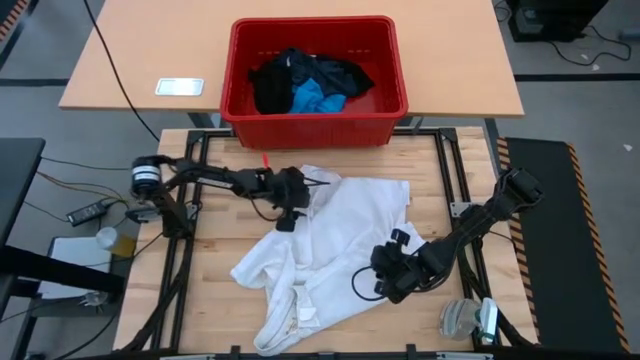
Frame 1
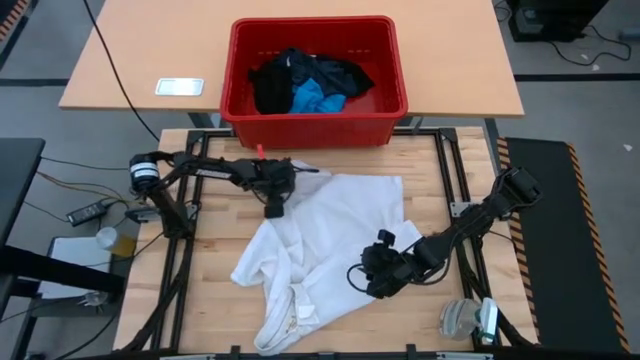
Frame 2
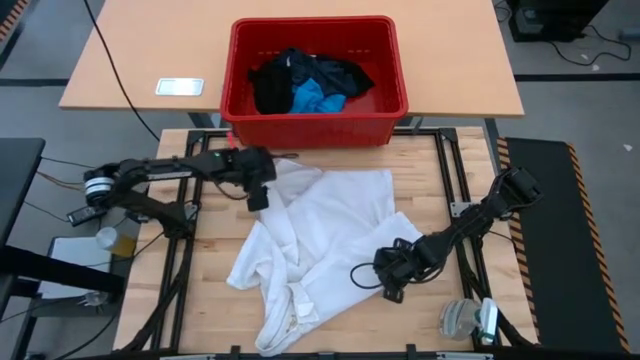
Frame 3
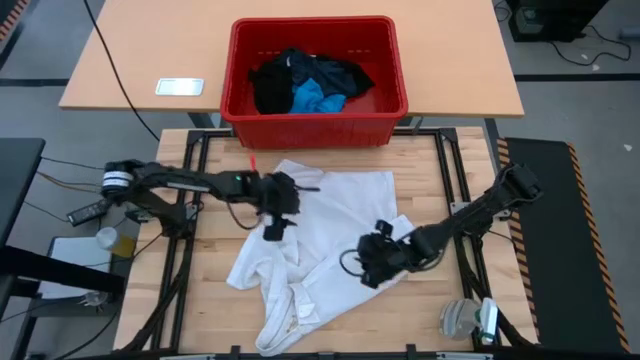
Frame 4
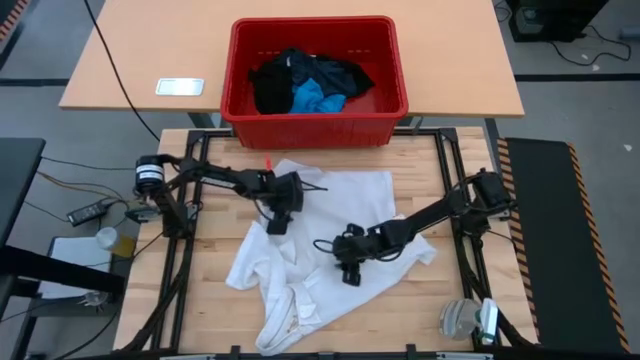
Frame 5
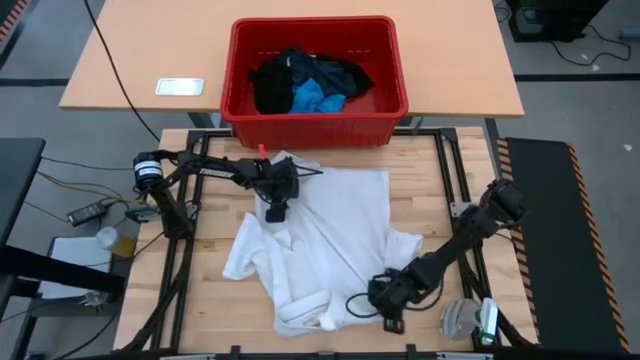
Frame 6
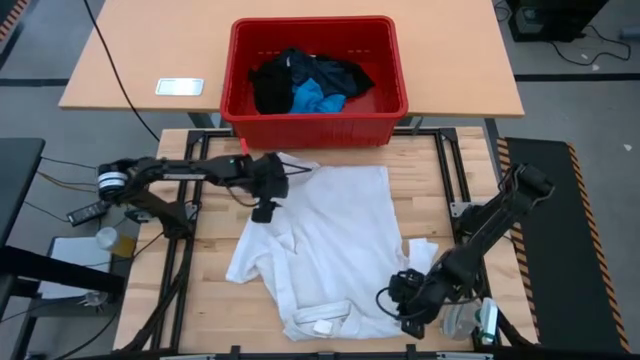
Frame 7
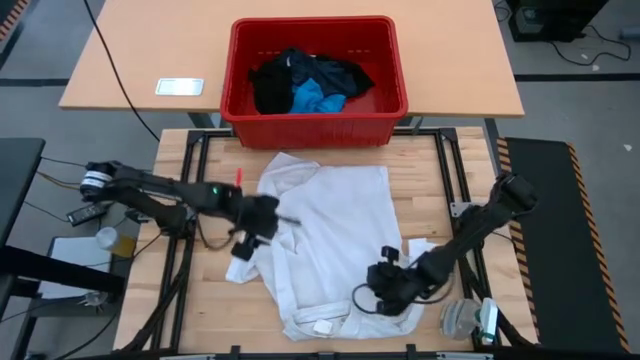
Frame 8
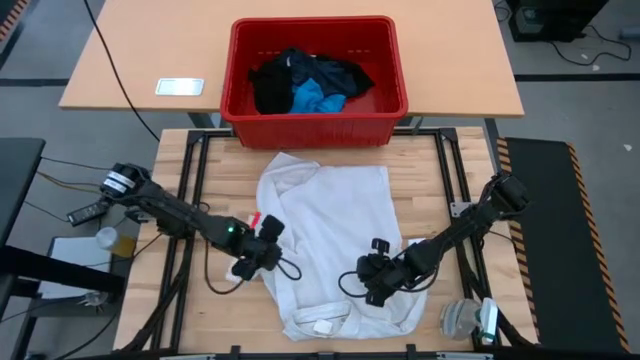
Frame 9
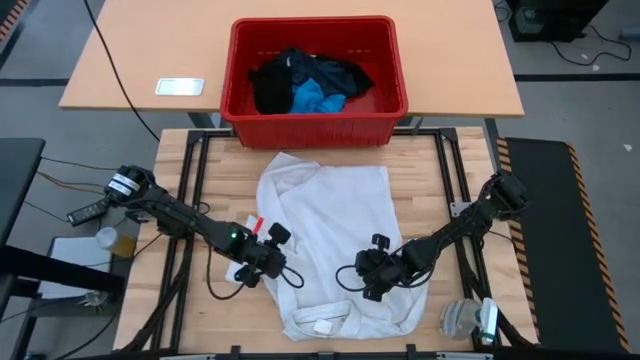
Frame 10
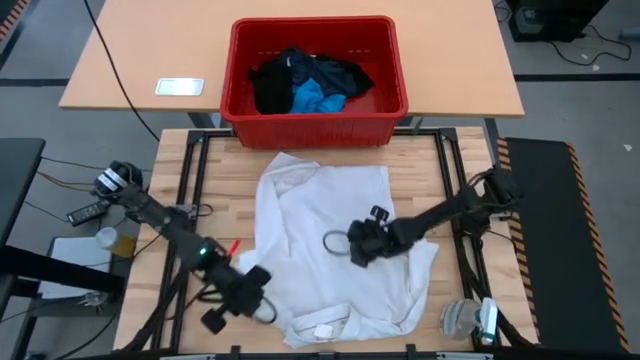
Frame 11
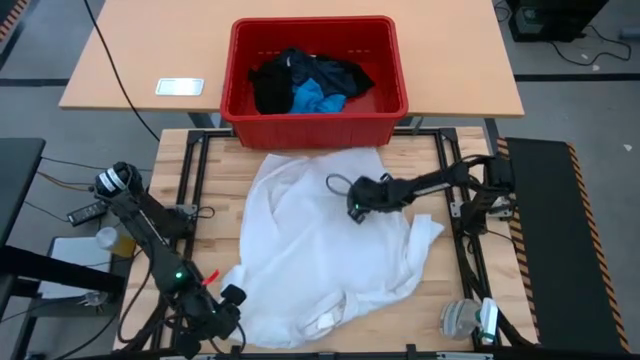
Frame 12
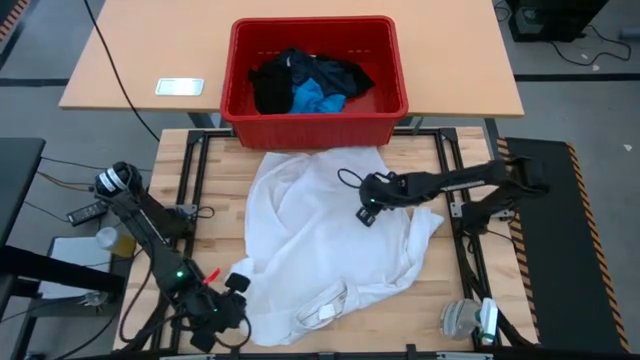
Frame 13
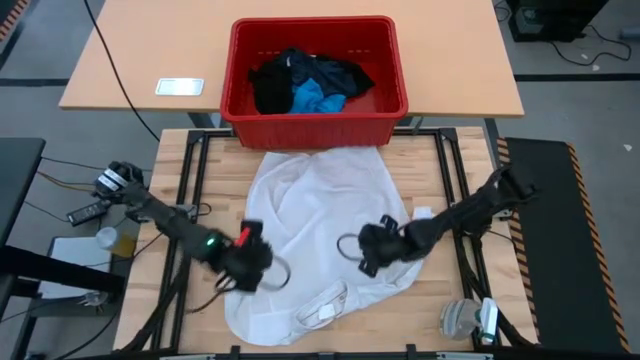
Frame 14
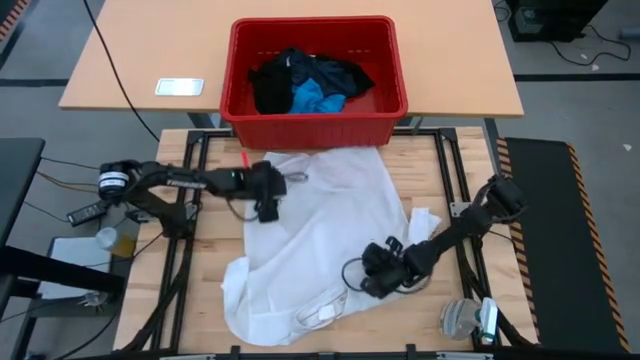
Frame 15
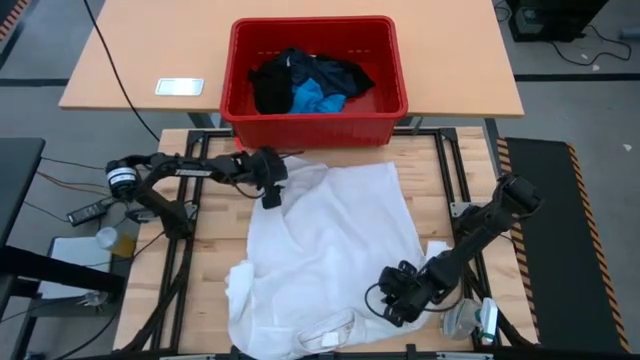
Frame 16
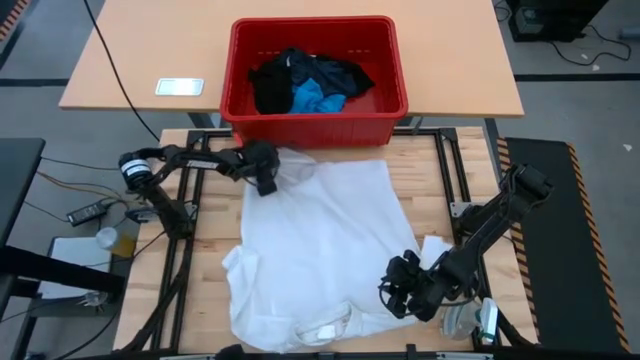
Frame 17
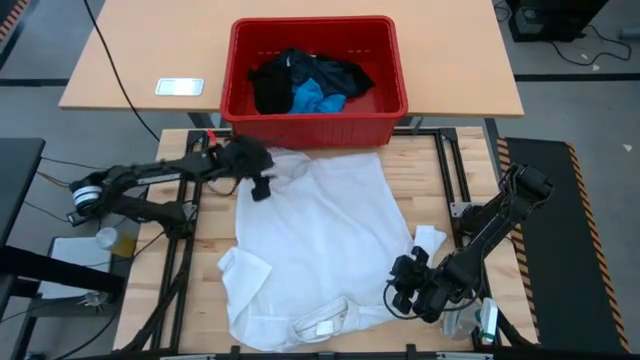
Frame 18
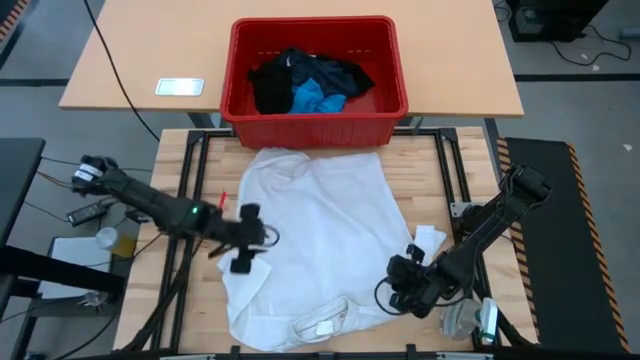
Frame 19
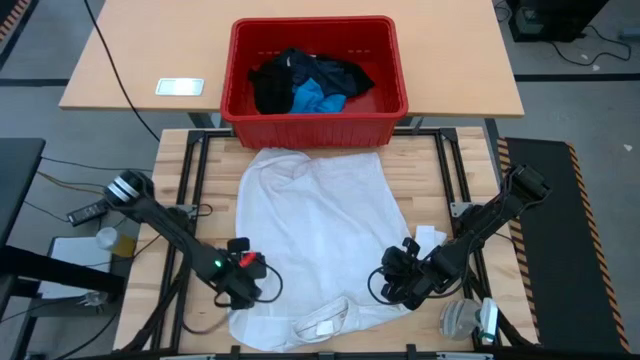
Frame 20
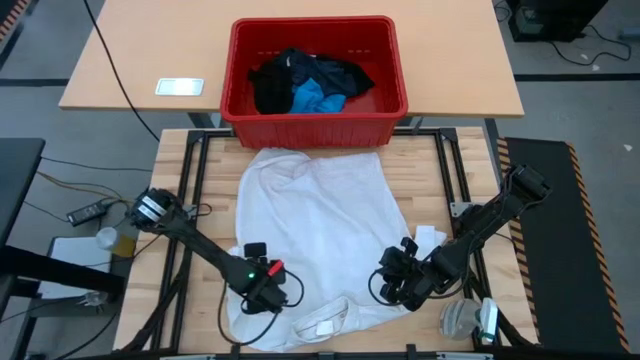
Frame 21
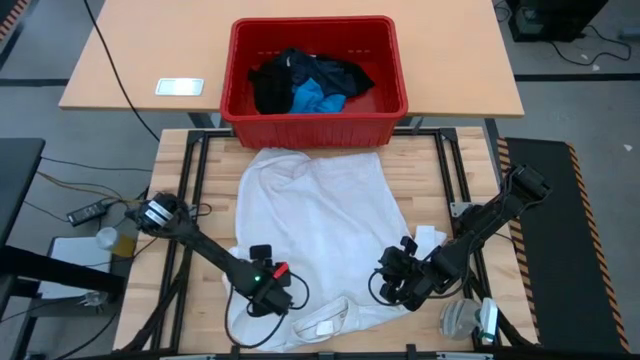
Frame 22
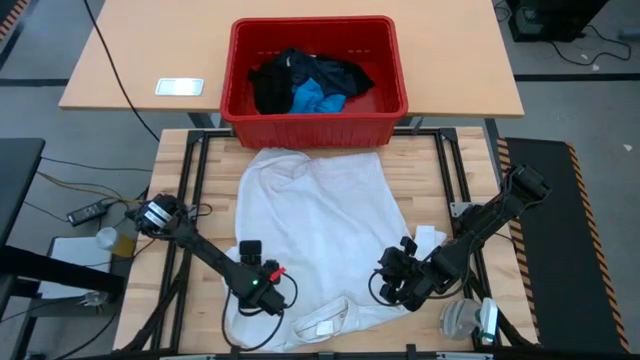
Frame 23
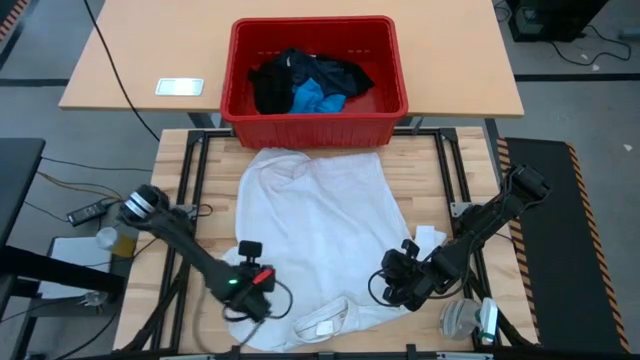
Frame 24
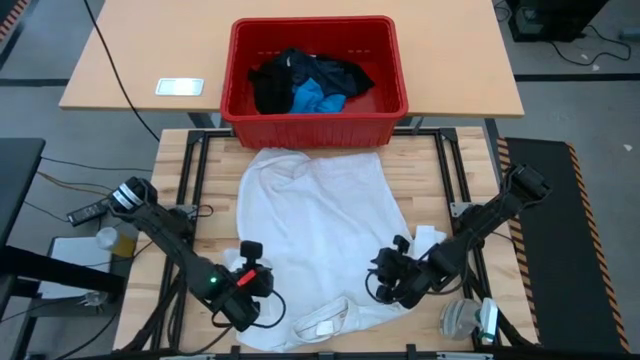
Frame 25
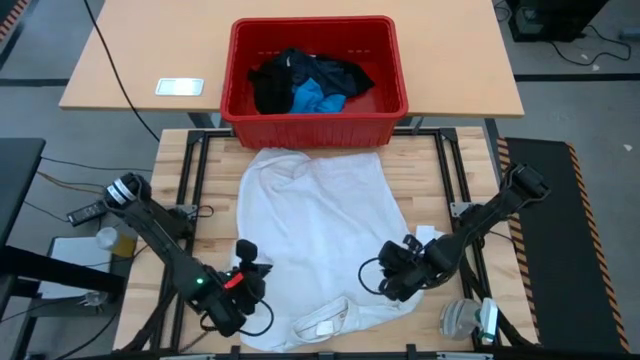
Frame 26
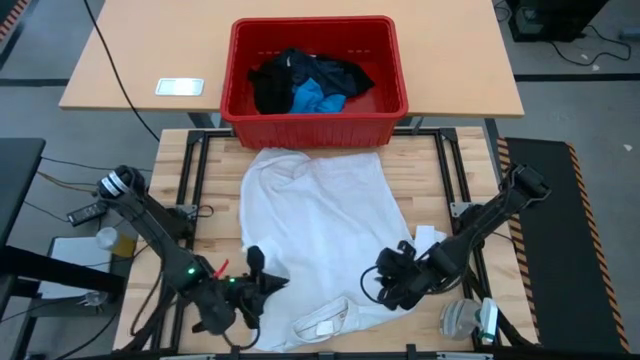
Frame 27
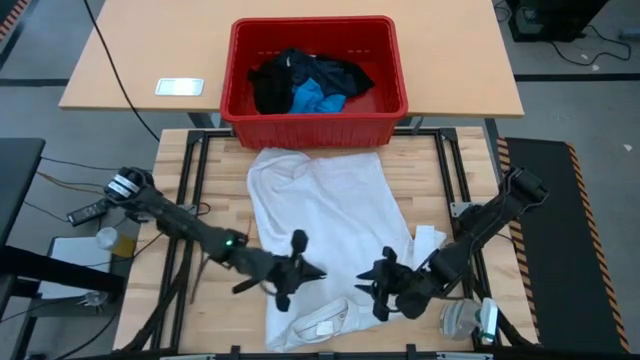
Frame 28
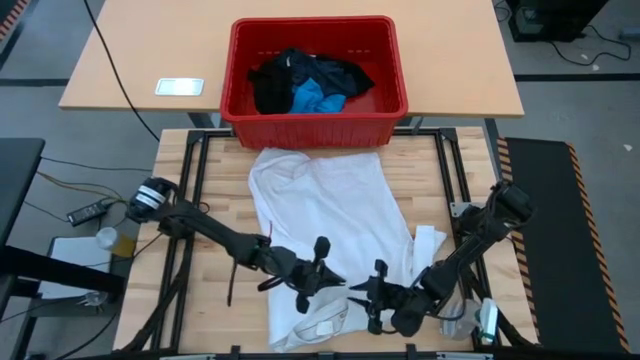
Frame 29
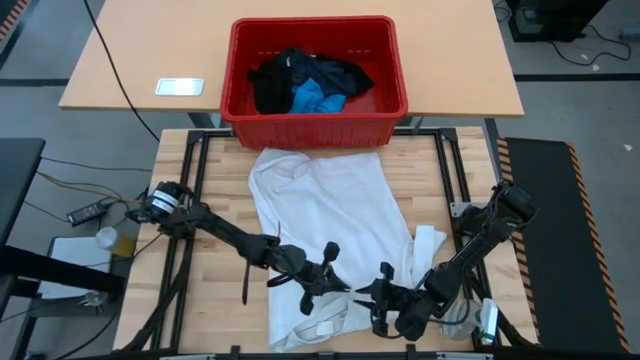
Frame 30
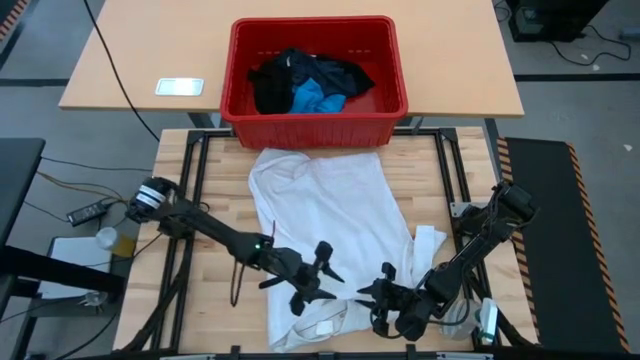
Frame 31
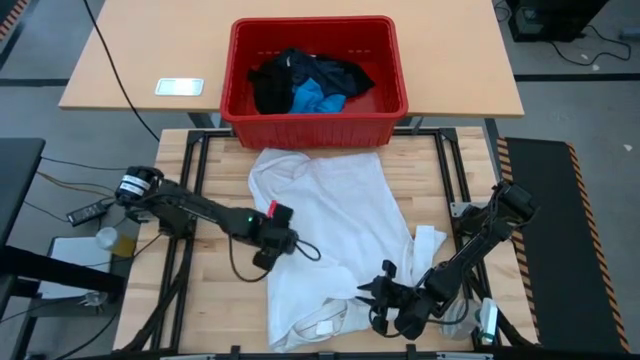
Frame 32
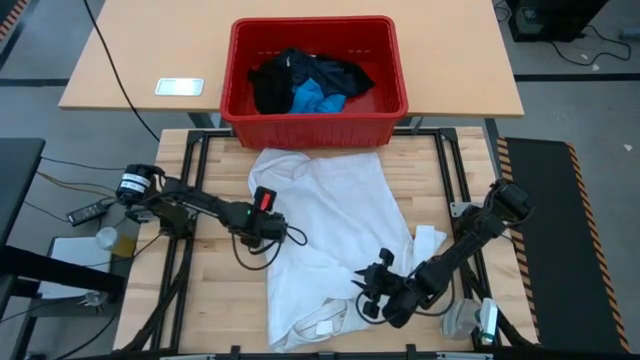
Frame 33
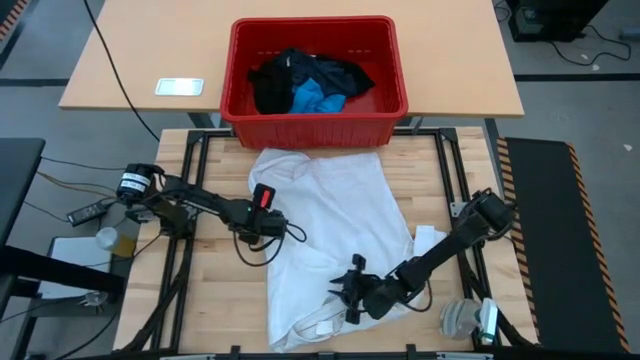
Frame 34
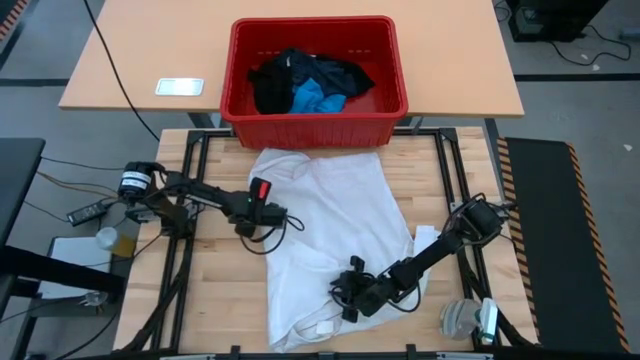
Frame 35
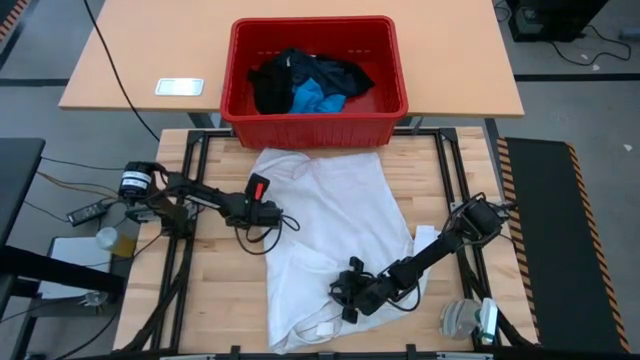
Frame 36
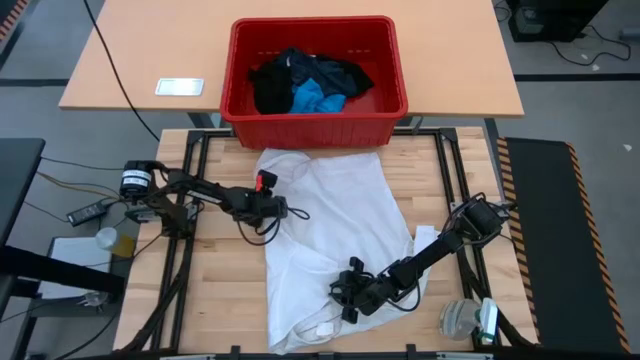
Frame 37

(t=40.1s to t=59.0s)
Task: Fold laundry
Fold the white polo

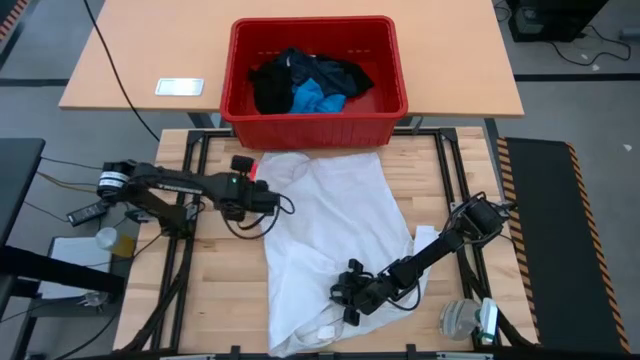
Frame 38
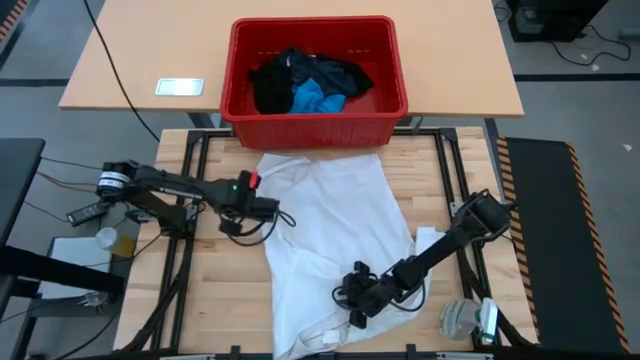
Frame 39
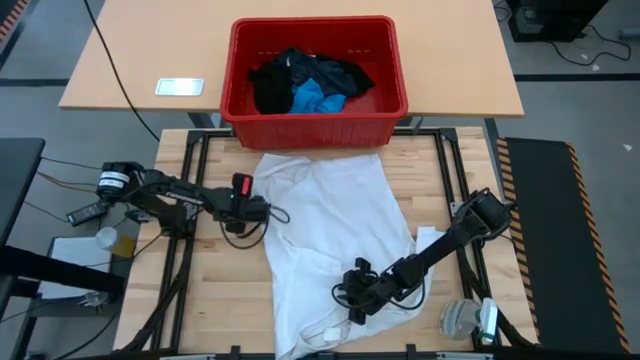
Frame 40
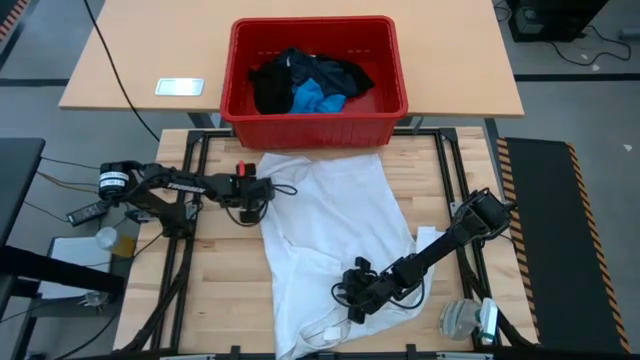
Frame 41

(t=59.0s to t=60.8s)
Fold the white polo

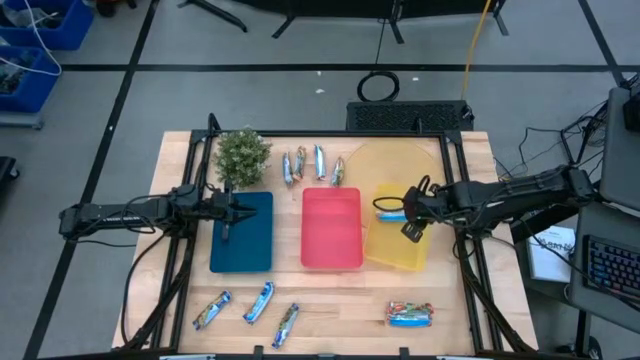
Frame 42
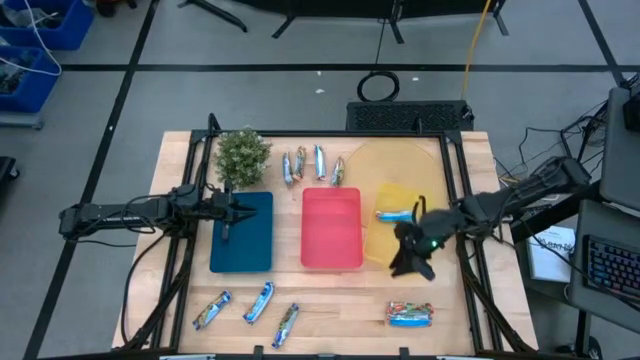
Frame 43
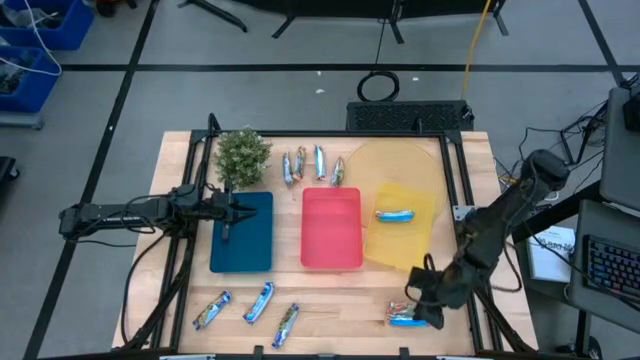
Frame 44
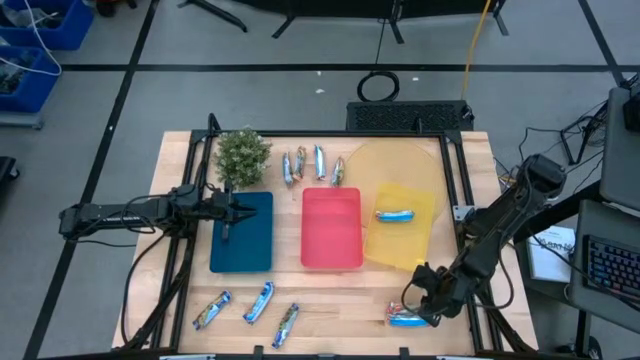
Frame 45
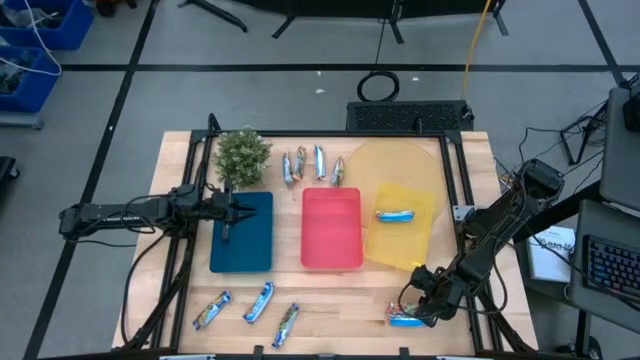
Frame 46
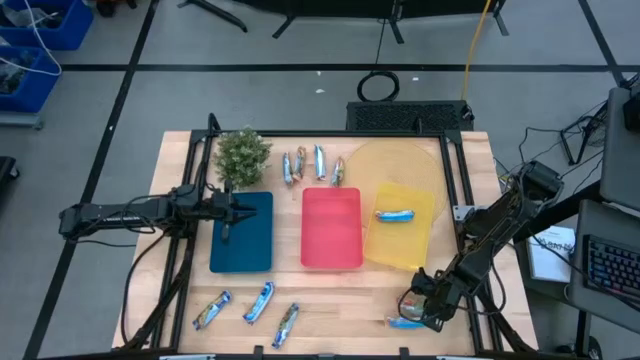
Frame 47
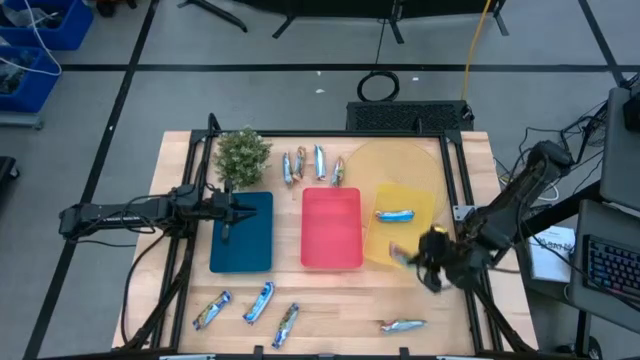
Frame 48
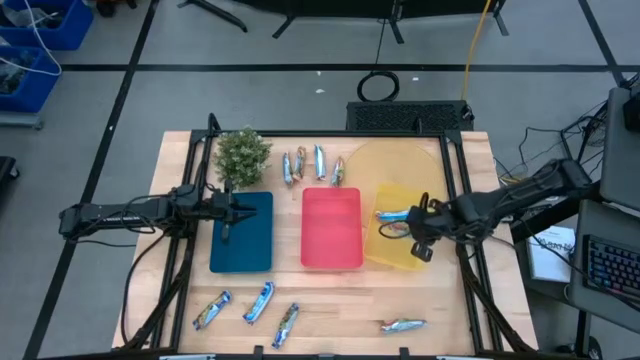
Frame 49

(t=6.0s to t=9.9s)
Task: Pick and place Granola Bars by type
Put the red granola bar into the yellow bin
